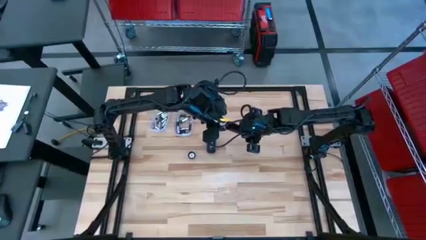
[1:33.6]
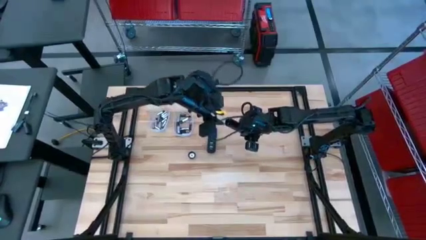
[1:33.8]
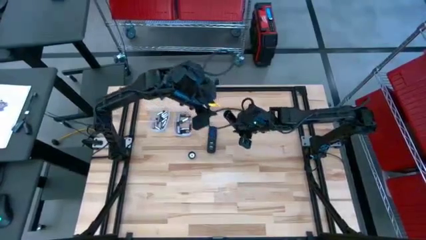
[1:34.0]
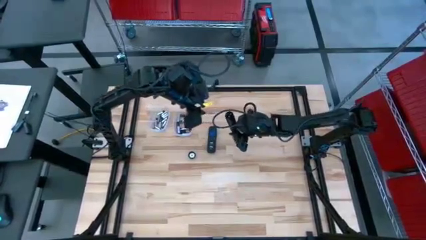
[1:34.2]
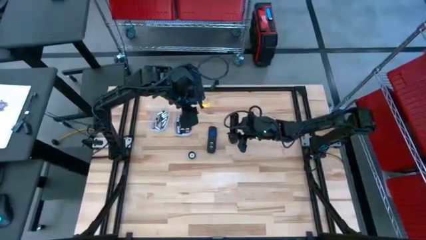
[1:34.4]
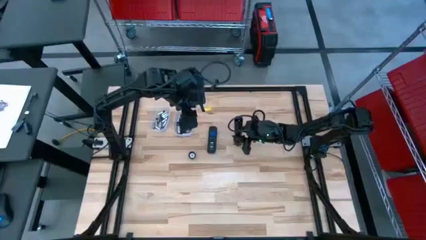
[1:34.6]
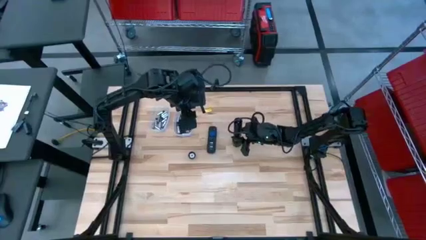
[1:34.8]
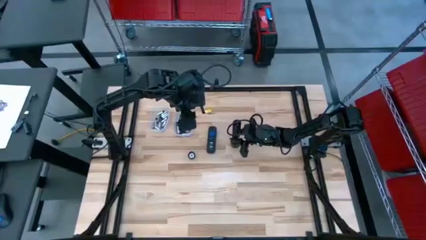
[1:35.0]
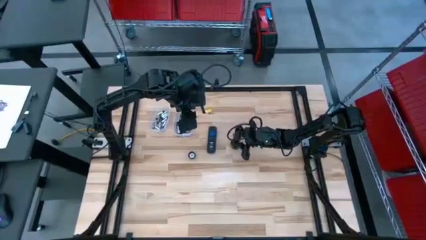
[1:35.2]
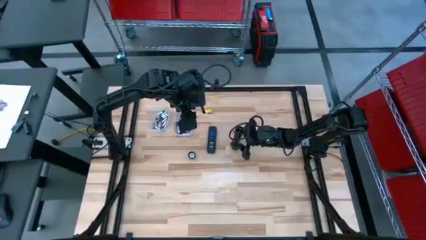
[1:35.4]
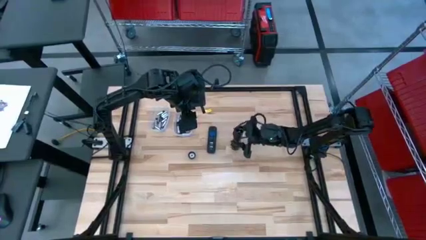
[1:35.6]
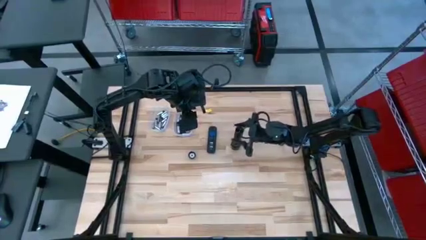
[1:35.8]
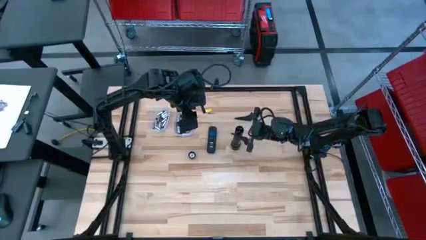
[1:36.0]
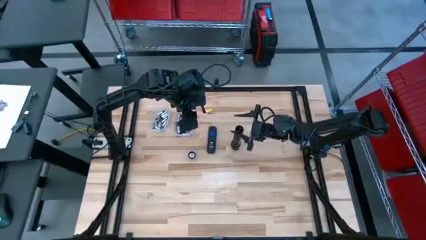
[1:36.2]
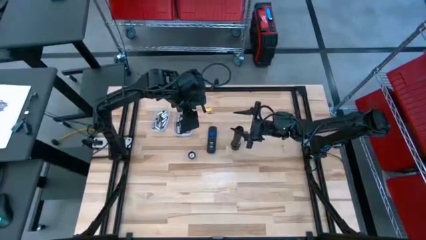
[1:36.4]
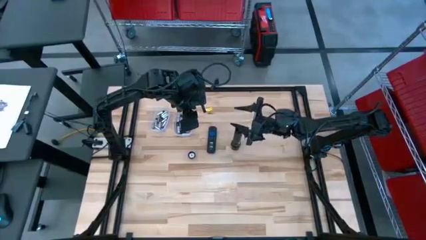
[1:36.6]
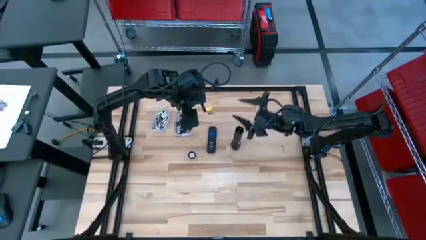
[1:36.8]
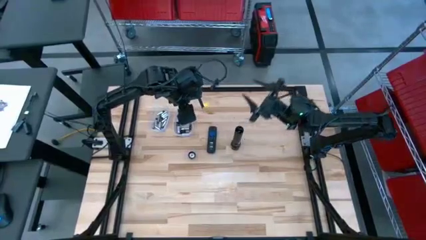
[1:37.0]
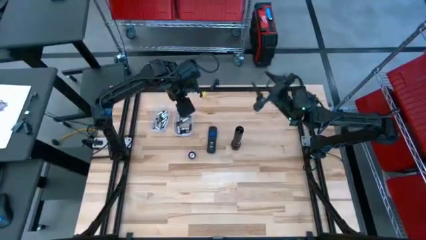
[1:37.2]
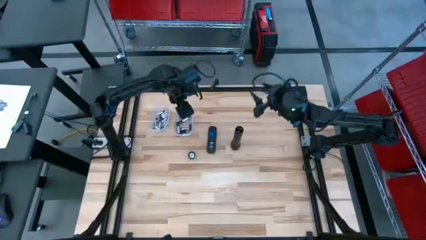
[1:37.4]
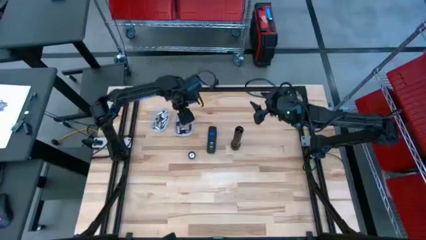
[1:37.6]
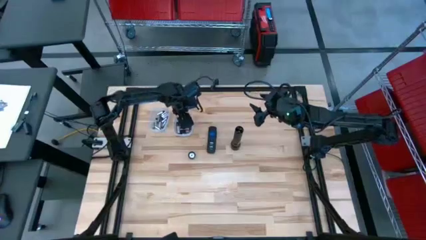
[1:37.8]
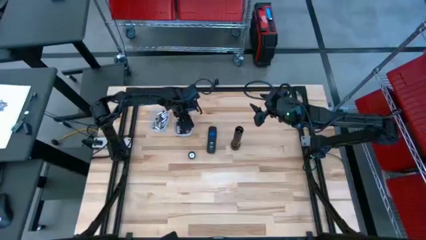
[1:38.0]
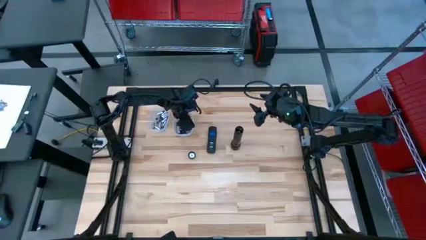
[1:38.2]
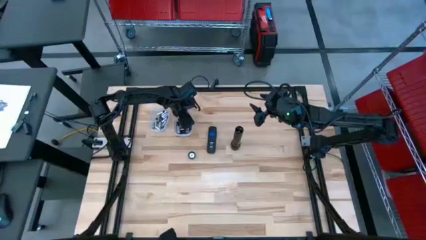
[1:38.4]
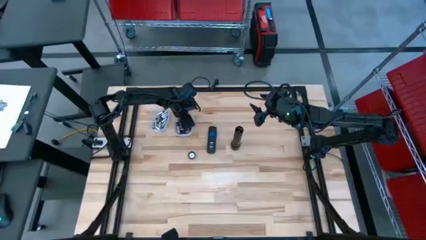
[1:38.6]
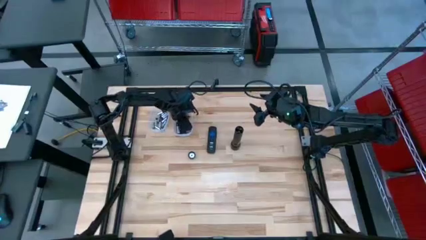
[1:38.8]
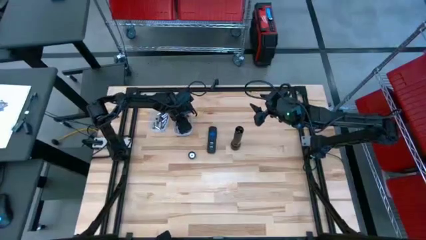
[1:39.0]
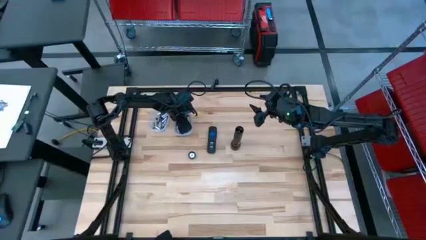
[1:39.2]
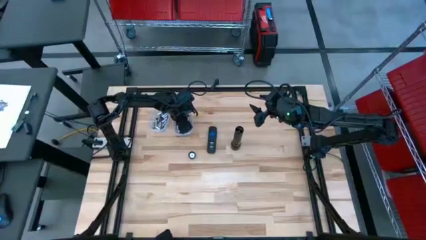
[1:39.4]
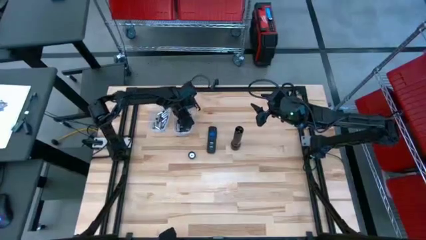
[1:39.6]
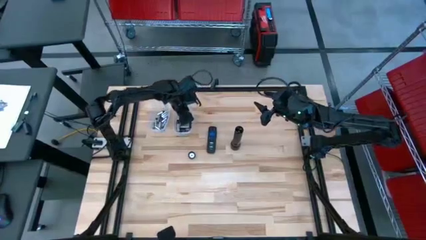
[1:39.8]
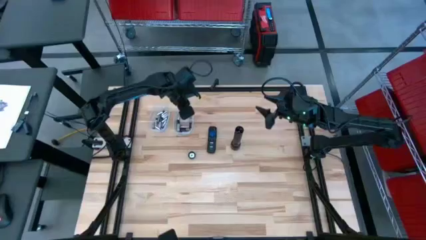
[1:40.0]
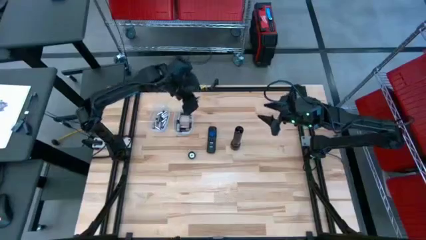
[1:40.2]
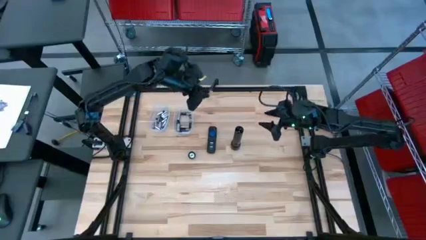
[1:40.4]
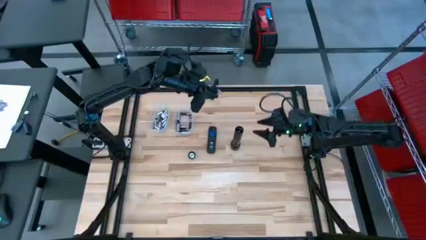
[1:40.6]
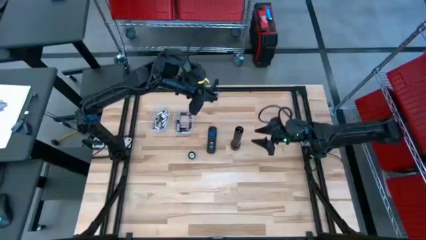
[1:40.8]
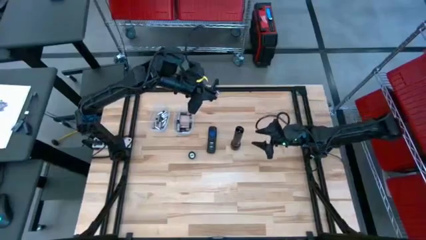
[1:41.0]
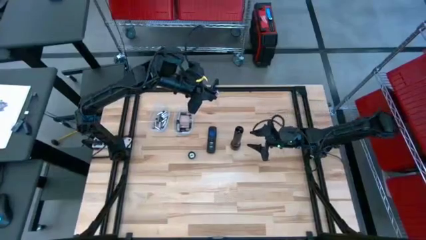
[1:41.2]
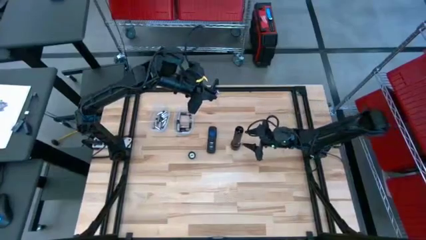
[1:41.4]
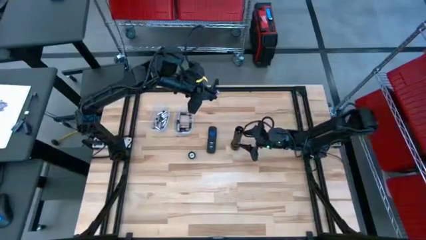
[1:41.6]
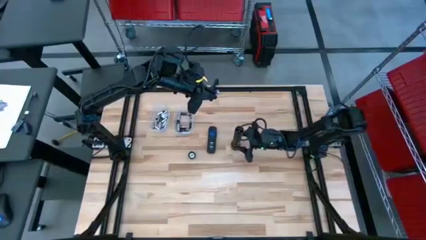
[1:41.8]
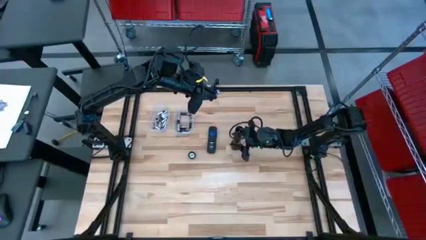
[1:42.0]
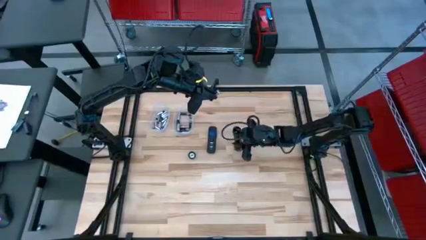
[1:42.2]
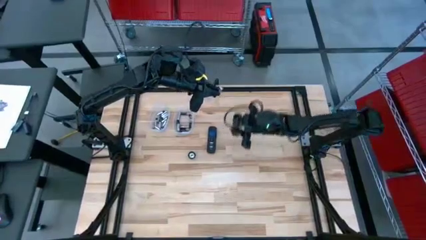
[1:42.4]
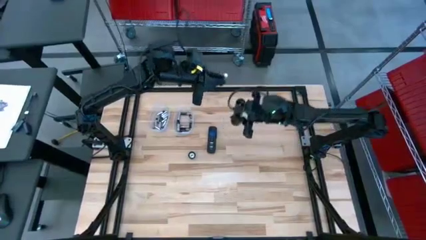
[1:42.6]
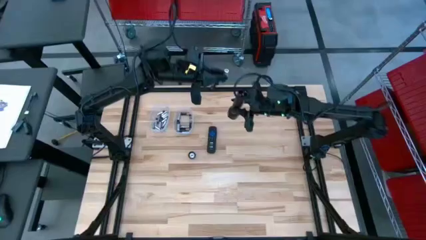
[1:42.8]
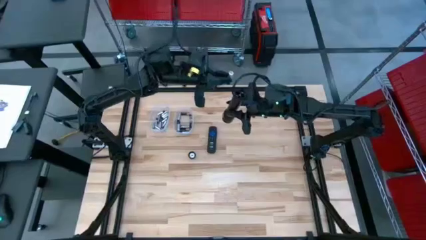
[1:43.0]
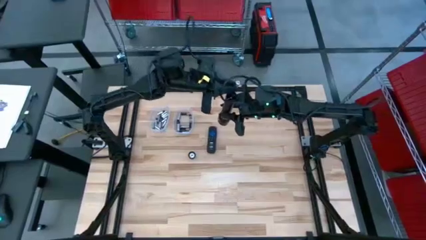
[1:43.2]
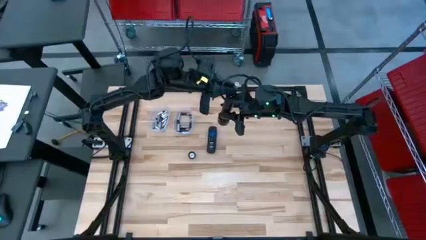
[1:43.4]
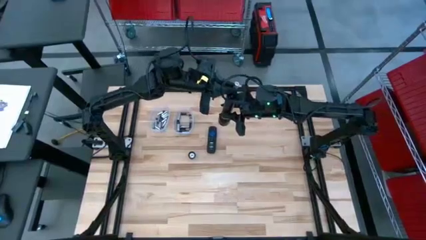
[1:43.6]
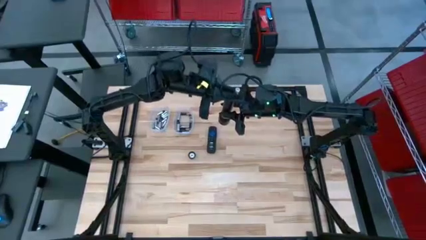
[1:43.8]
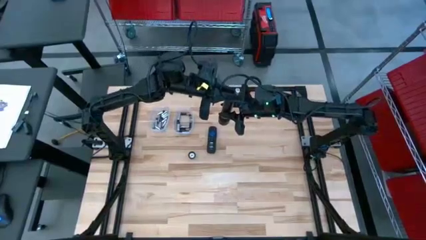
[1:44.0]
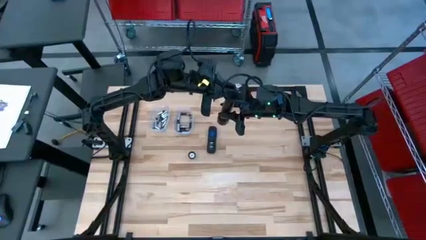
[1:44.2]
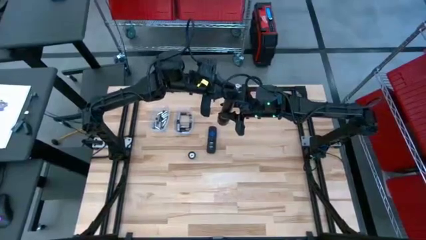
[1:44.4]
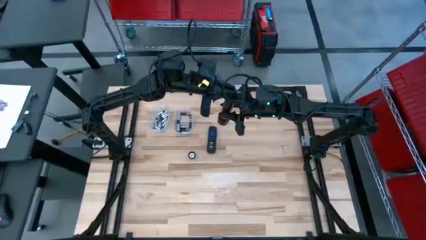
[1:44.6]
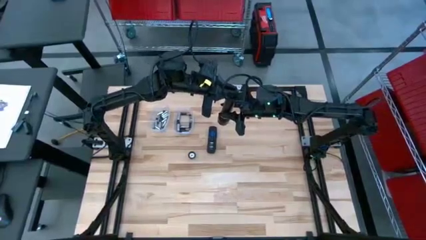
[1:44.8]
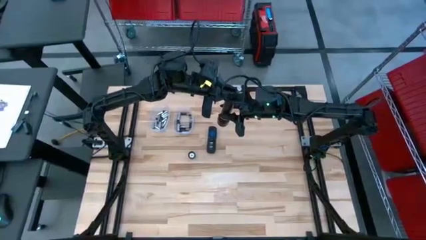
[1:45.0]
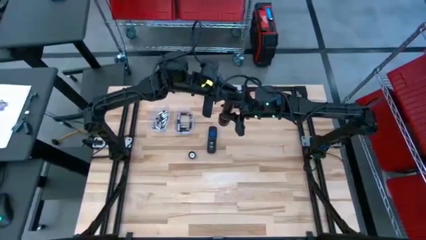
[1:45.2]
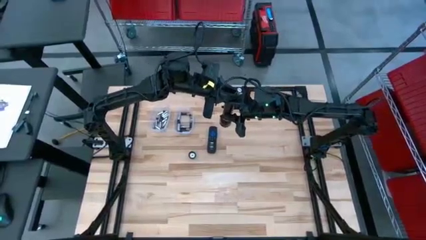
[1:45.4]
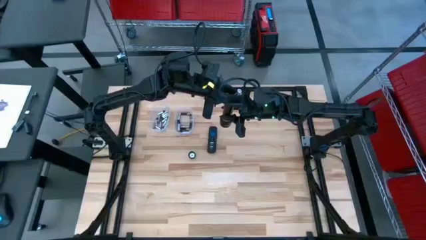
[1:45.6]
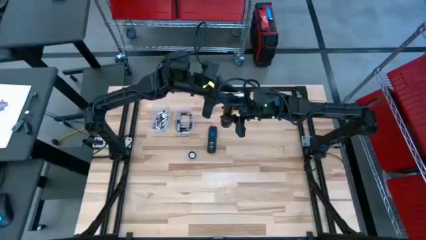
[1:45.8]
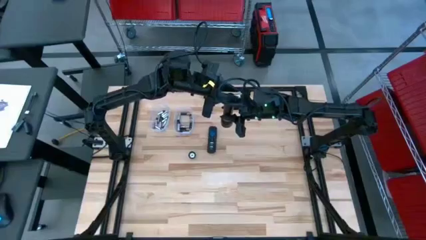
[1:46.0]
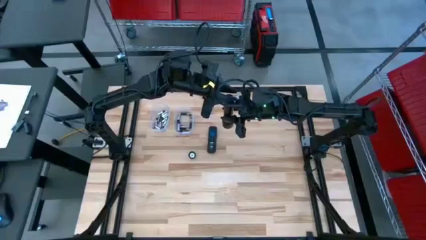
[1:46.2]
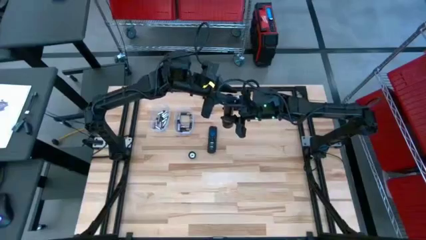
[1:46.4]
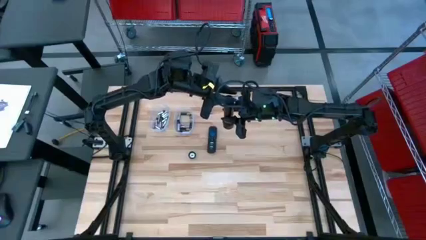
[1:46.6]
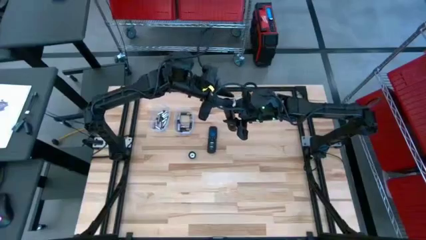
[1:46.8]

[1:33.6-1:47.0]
Task: Insert battery
Insert the silver battery into the flashlight battery compartment

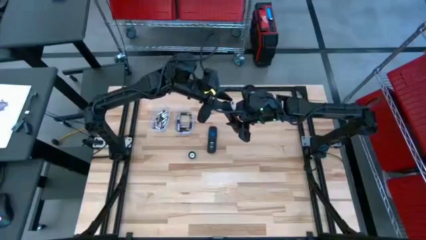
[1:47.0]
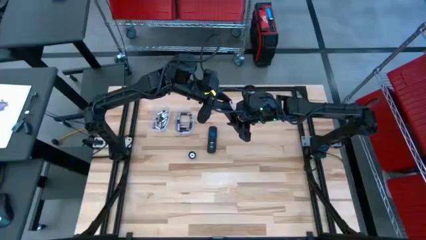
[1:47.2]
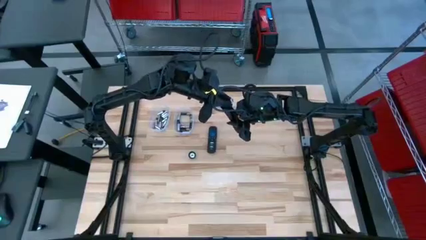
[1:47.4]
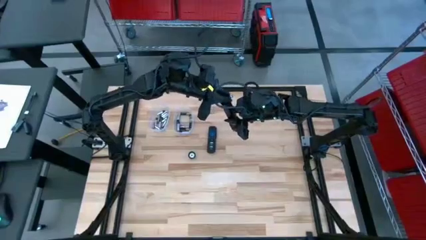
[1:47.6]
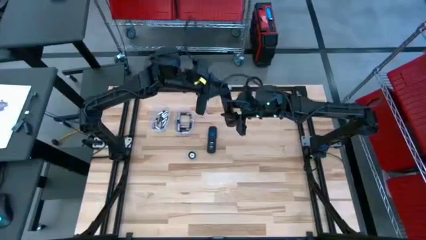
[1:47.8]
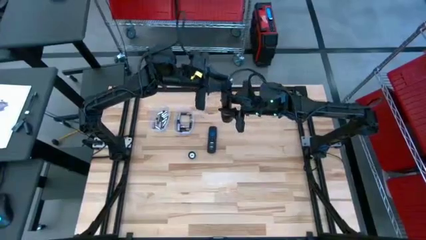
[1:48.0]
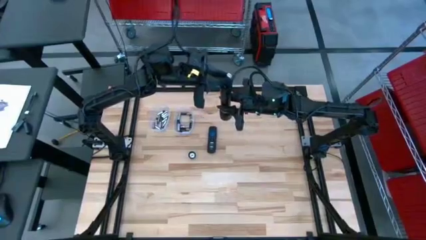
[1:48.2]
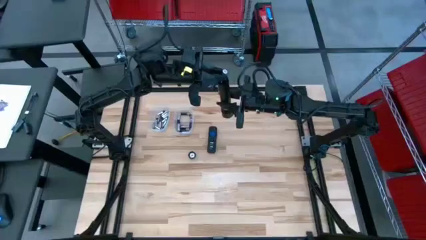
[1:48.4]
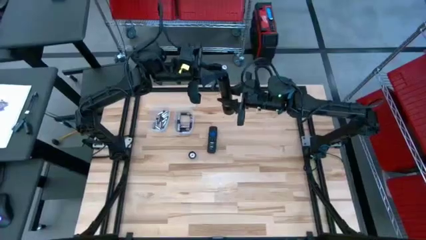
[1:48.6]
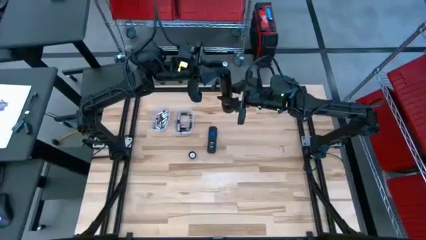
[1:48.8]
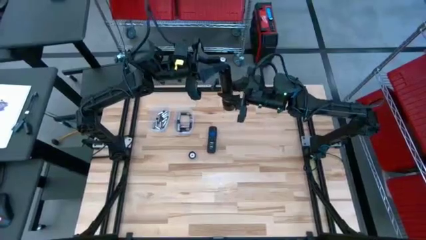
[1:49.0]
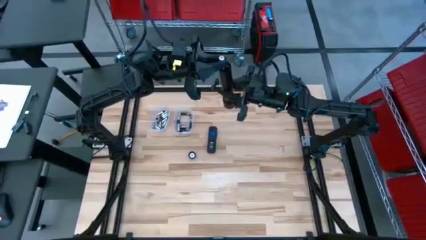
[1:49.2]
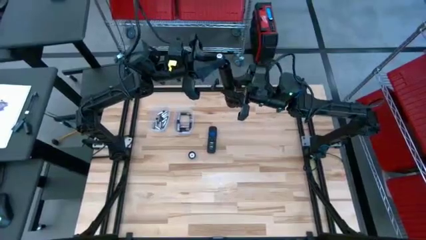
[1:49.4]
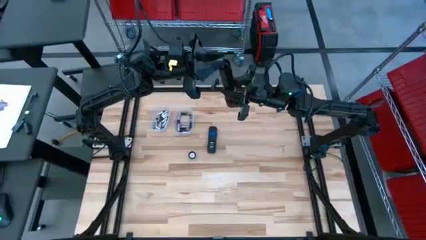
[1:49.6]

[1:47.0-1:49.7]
Insert the silver battery into the flashlight battery compartment

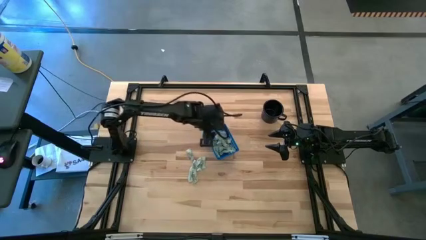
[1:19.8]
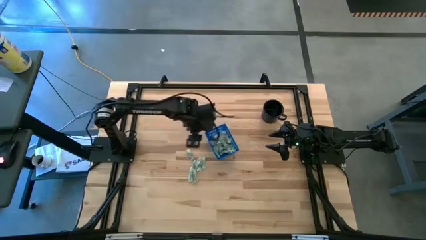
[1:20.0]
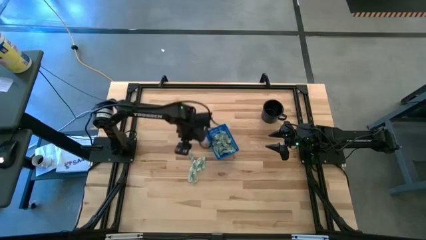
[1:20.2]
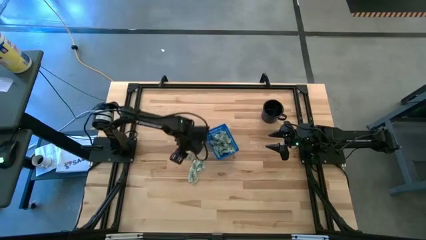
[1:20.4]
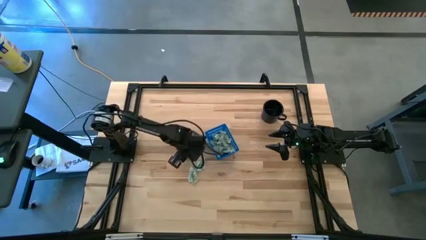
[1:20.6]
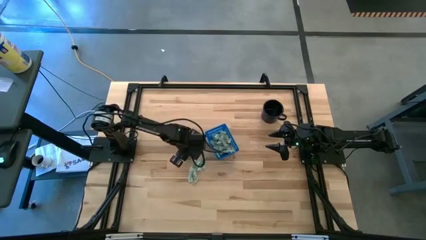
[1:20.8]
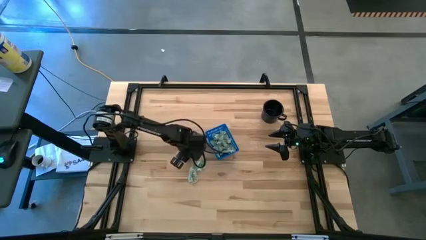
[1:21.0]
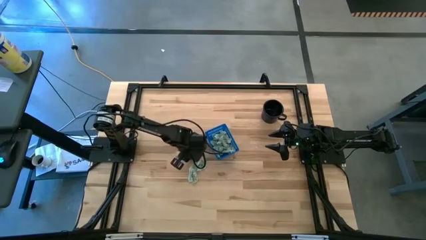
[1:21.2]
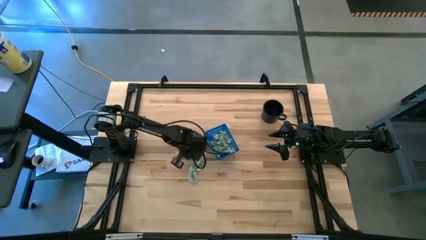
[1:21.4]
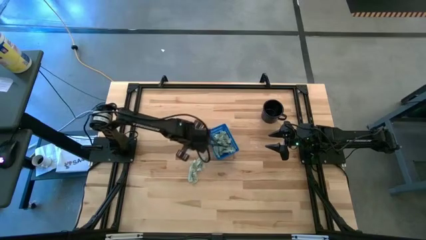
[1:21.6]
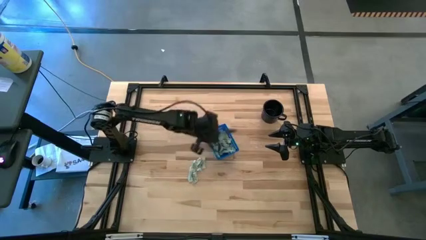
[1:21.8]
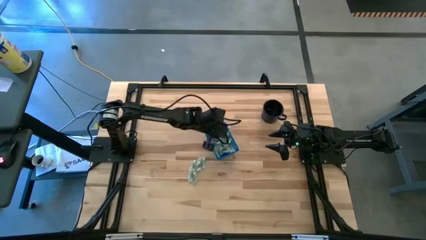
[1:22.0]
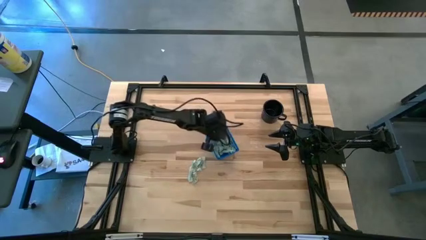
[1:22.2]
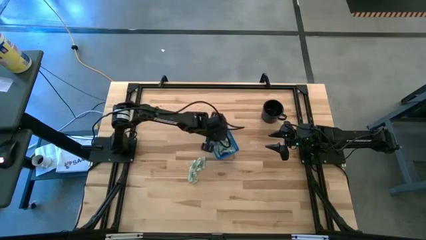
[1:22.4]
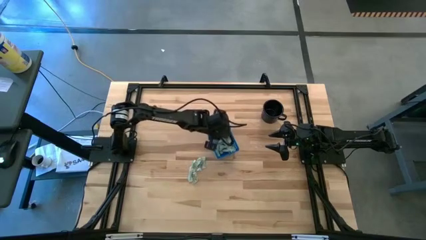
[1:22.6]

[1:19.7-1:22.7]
Task: Pick and place Stevia / Truvia into bins
Put the stevia packet into the basket
